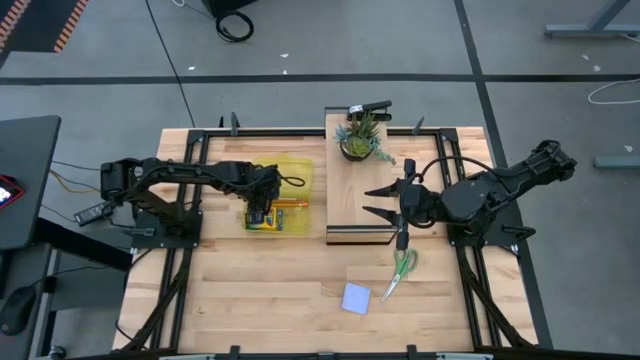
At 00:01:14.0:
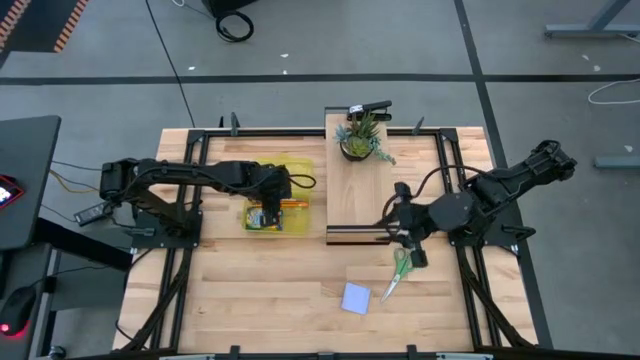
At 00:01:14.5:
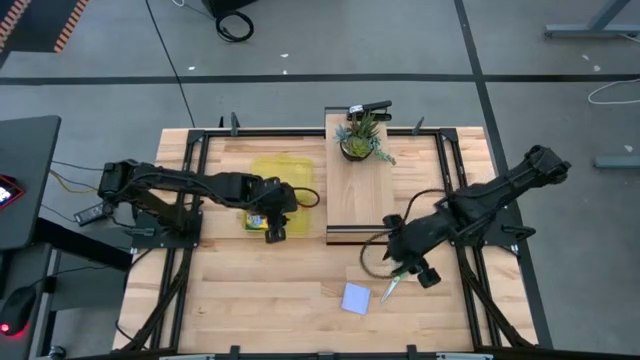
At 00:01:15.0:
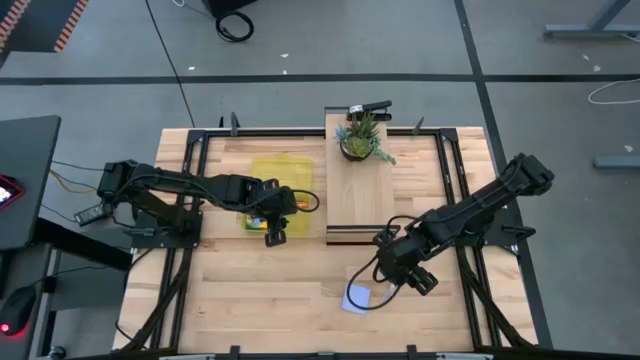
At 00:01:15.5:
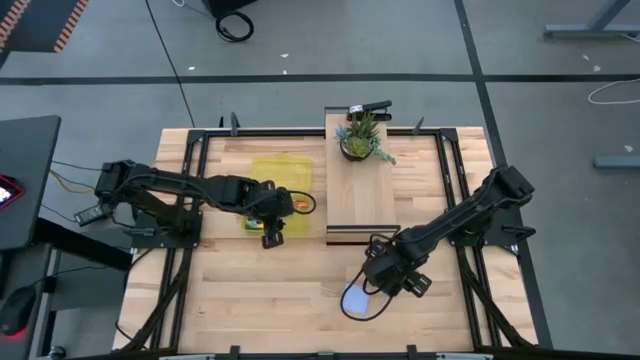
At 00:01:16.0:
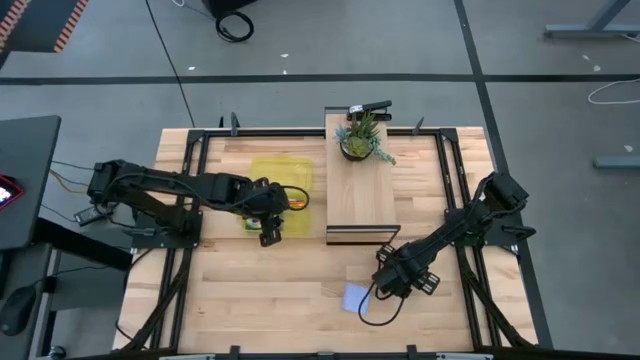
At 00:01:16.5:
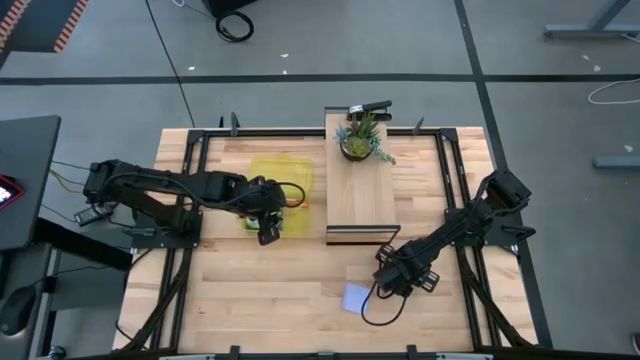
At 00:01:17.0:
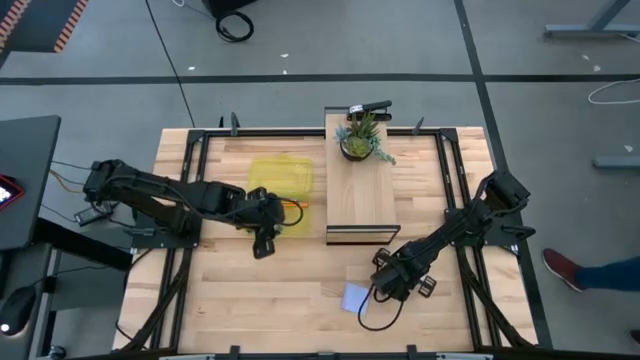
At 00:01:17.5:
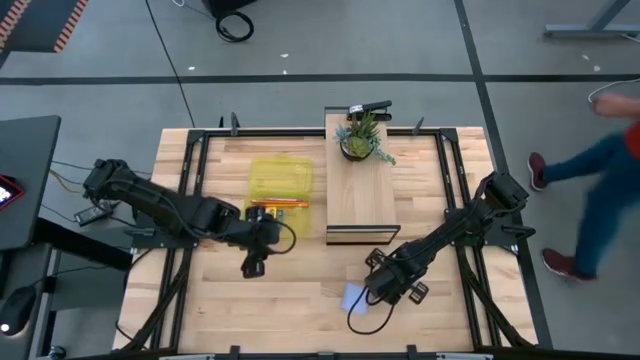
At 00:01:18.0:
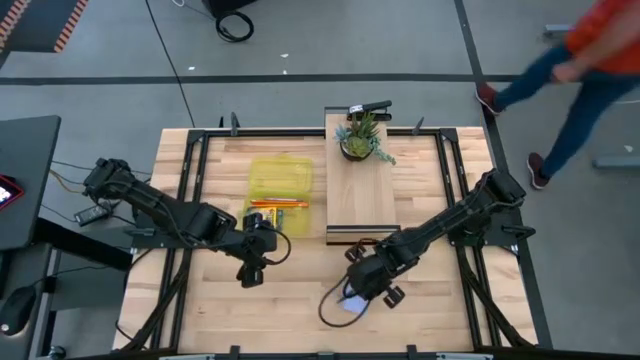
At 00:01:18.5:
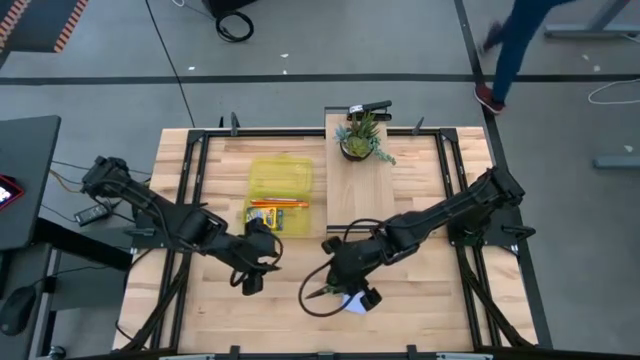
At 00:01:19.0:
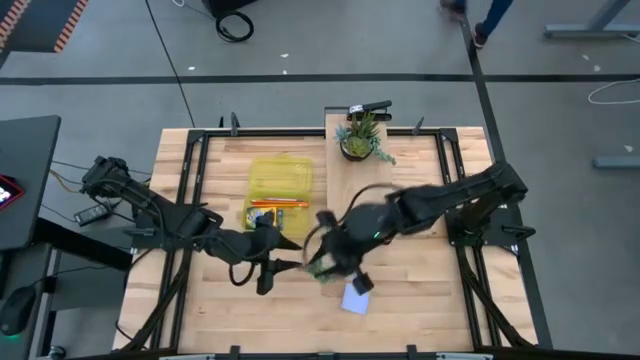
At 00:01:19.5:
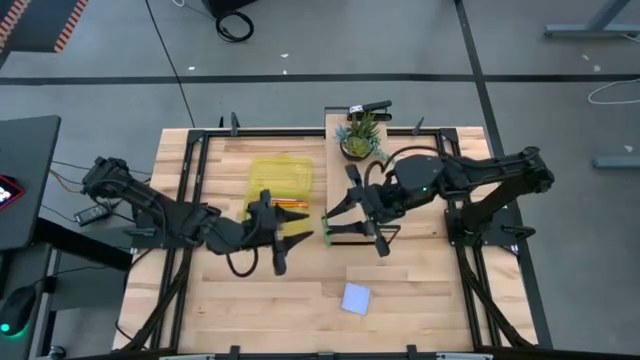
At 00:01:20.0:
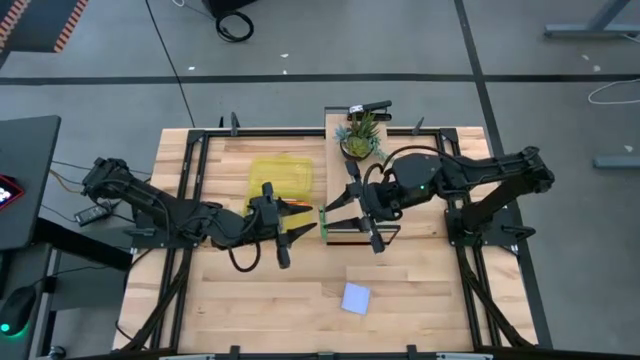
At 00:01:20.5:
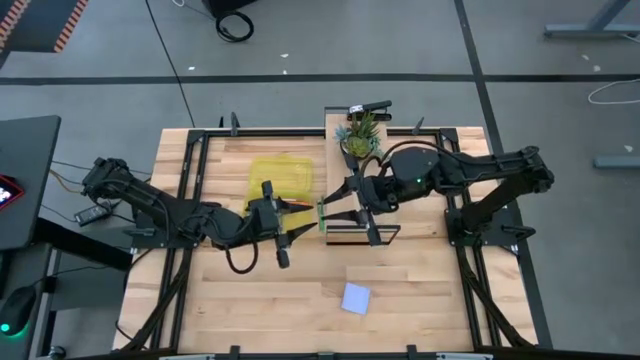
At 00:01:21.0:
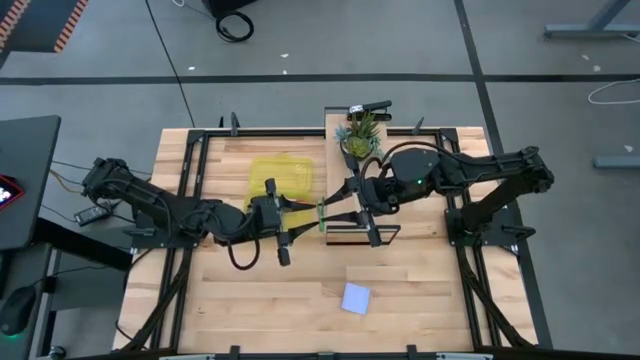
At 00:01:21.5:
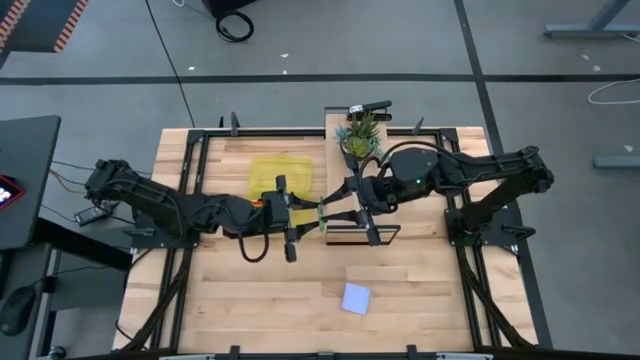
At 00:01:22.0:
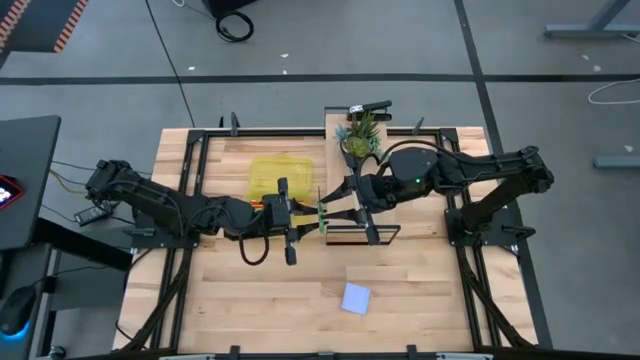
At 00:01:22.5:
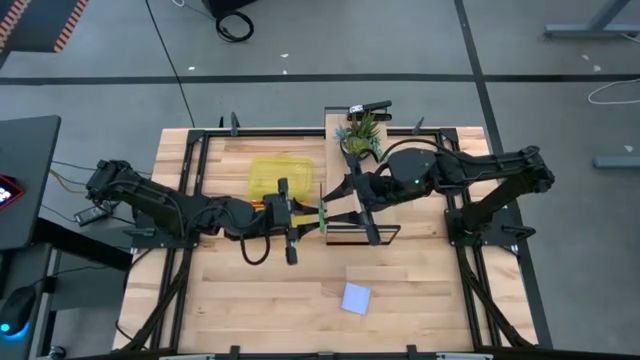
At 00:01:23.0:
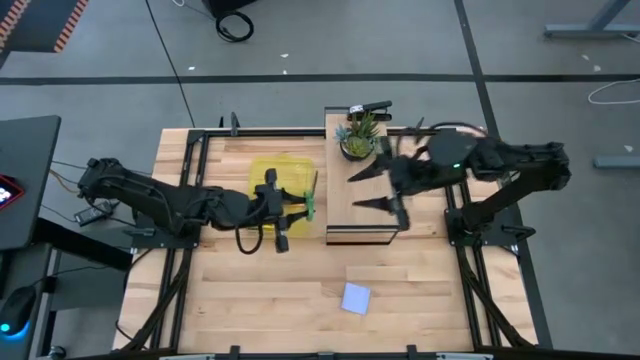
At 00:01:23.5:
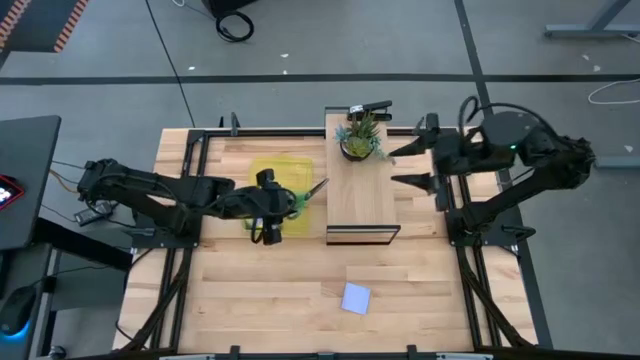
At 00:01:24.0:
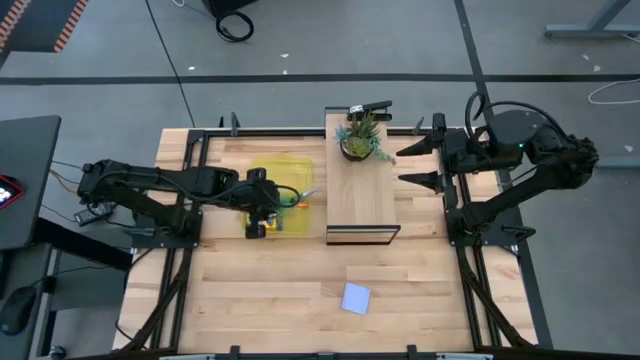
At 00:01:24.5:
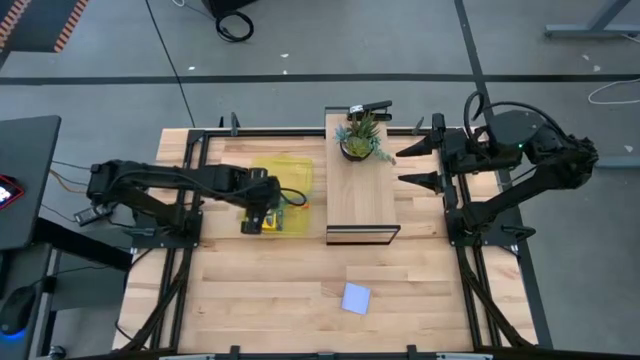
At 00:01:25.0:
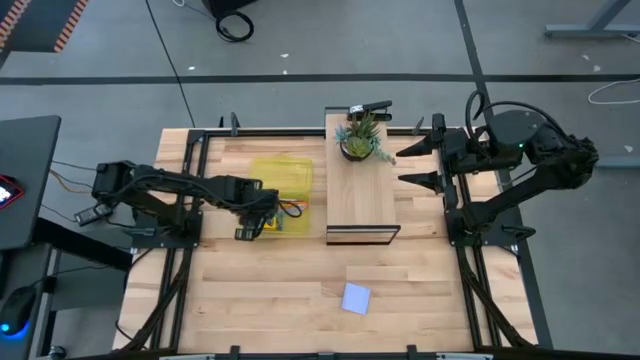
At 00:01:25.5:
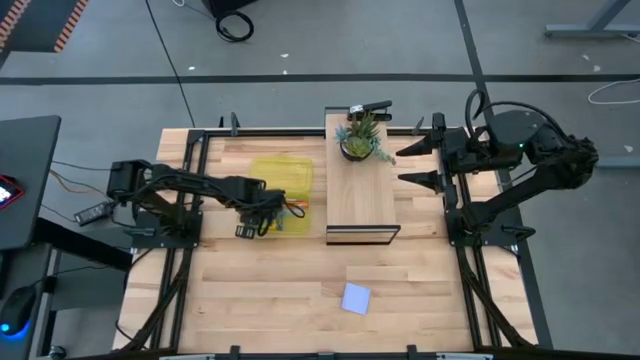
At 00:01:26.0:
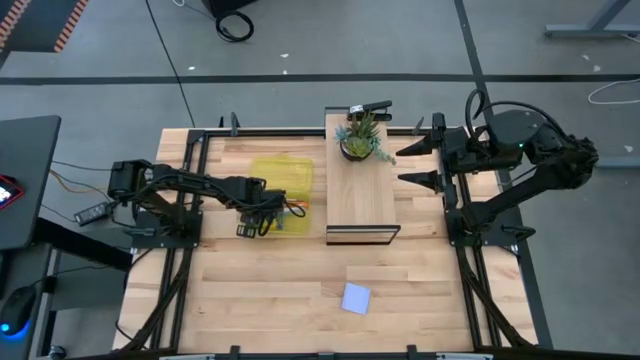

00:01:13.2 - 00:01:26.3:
Task: Pack school essentials
Put the scissors into the supply box

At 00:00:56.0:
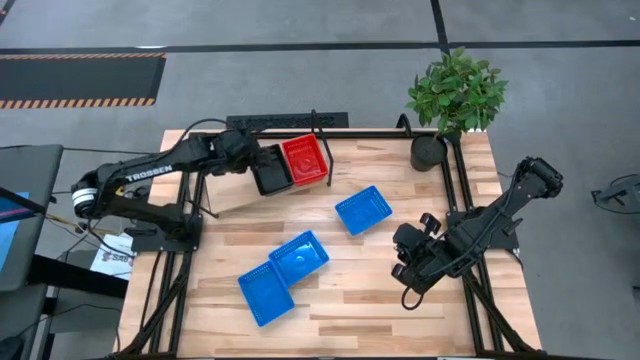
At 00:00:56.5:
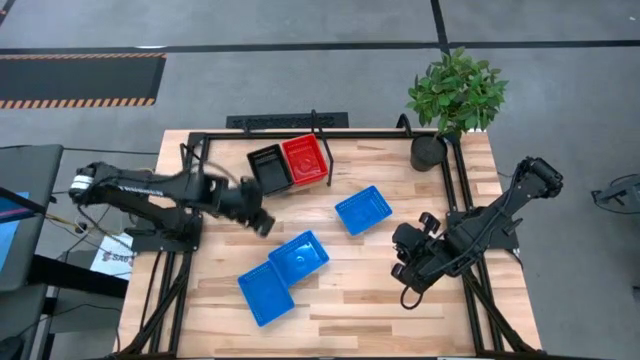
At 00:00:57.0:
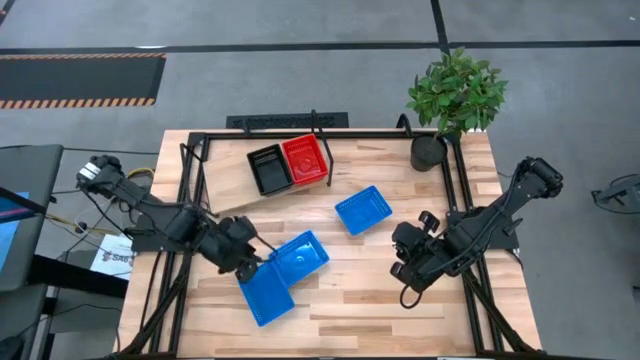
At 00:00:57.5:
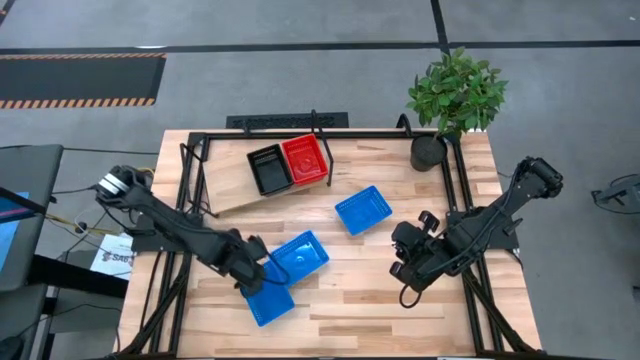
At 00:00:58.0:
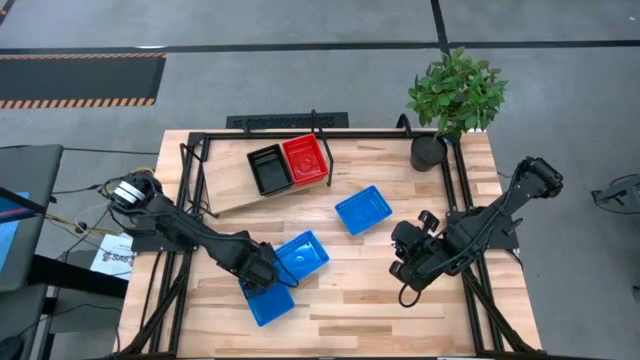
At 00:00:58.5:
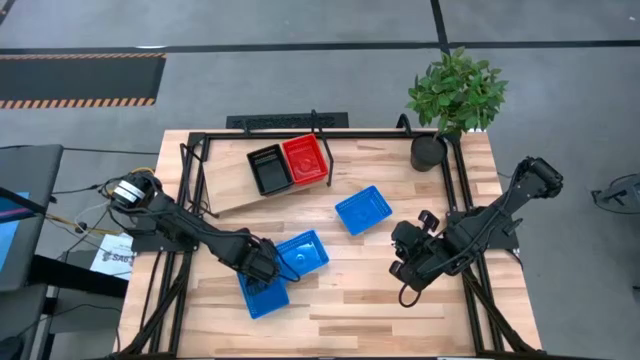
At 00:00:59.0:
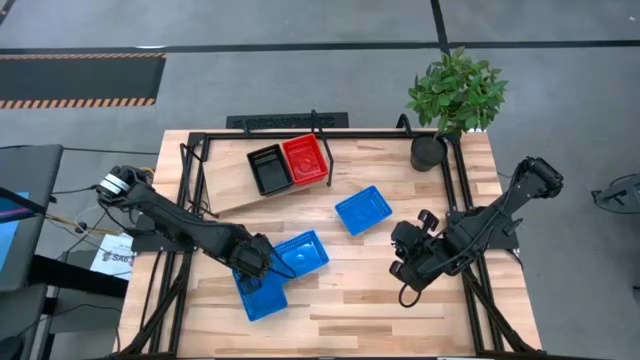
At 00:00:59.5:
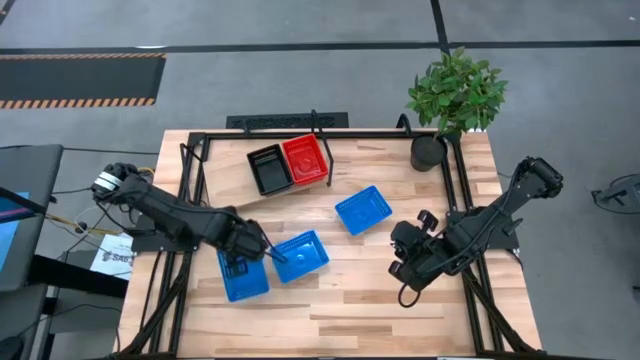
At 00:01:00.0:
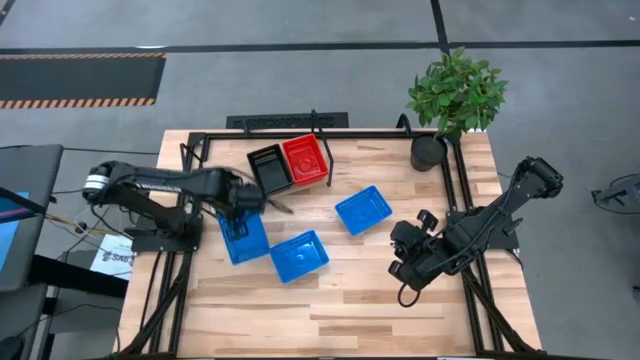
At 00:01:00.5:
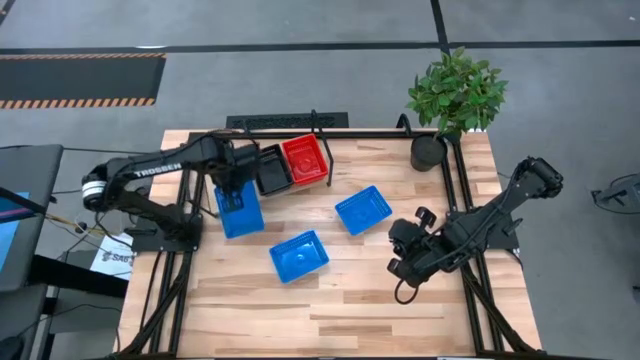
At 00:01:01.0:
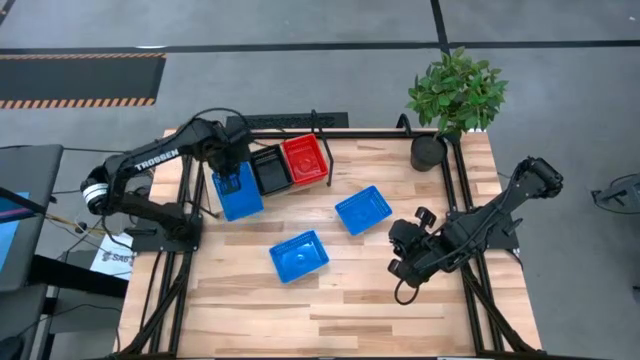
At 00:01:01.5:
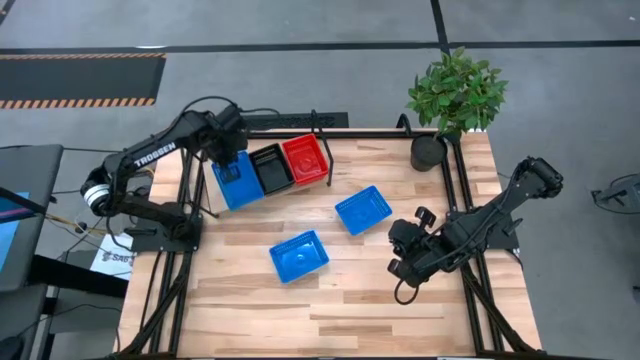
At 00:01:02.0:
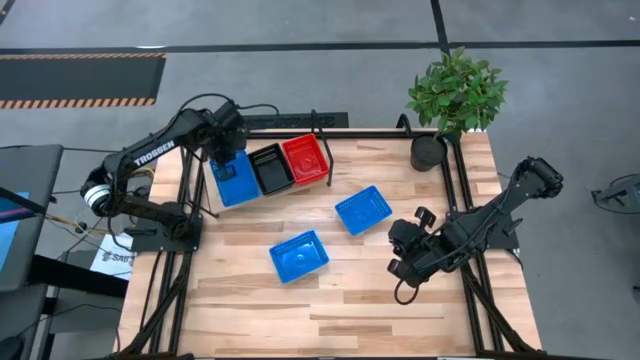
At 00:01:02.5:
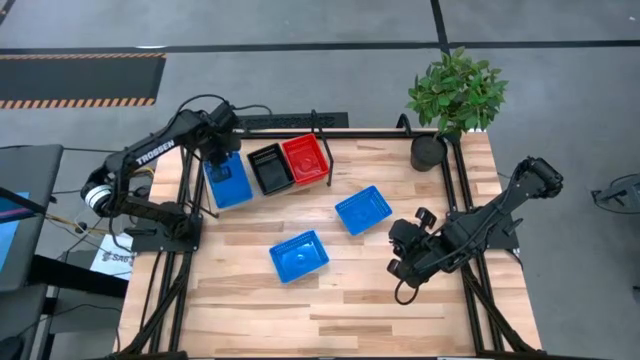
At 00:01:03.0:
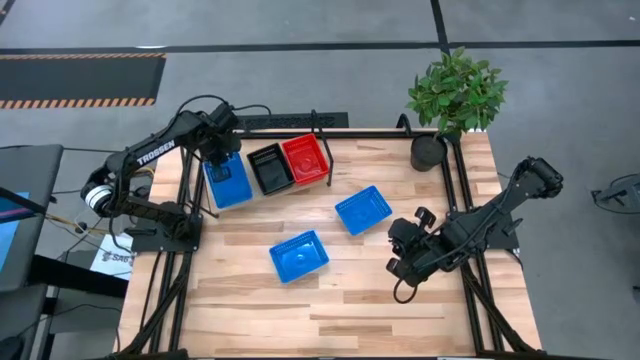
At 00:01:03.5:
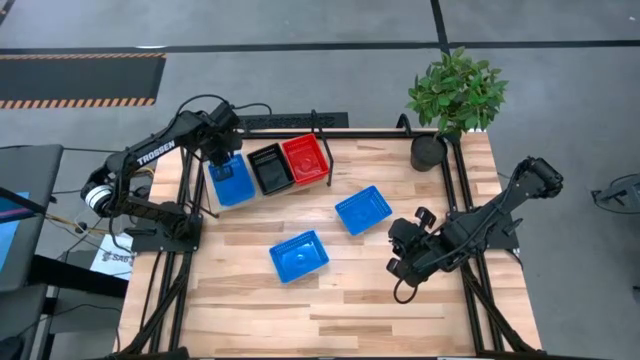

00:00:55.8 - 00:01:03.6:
Task: Stack baskets on shelf by color
Put the bottom blue bin on the shelf
